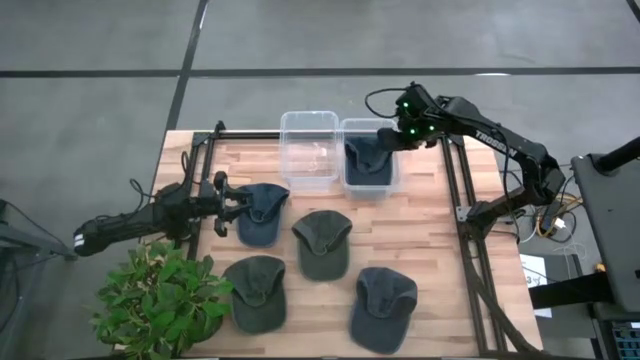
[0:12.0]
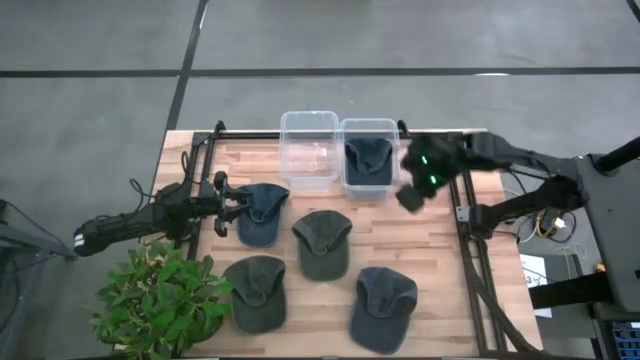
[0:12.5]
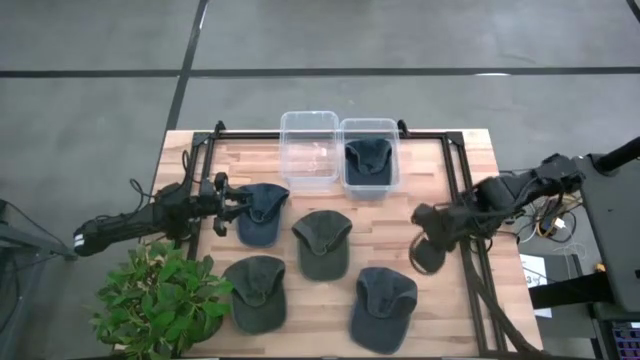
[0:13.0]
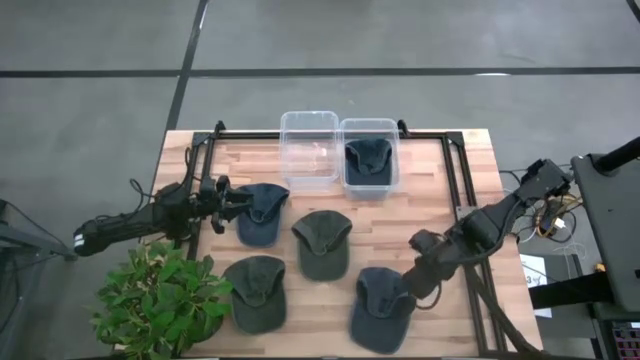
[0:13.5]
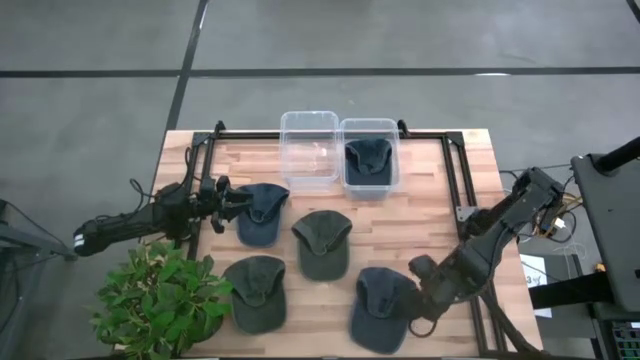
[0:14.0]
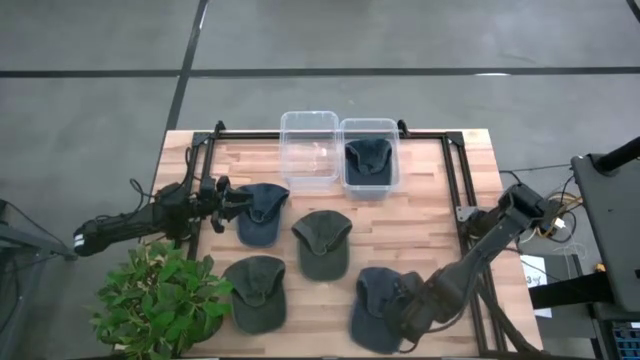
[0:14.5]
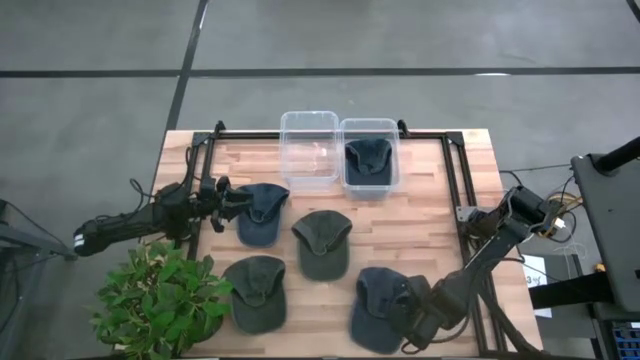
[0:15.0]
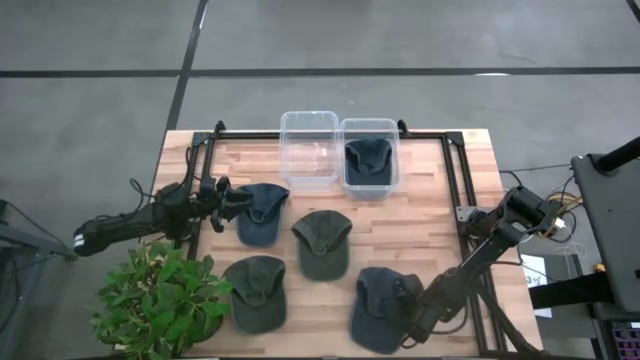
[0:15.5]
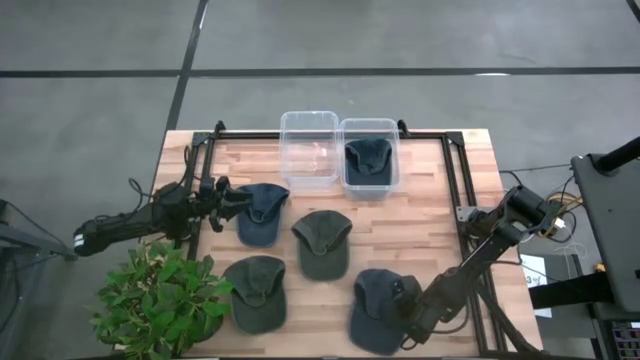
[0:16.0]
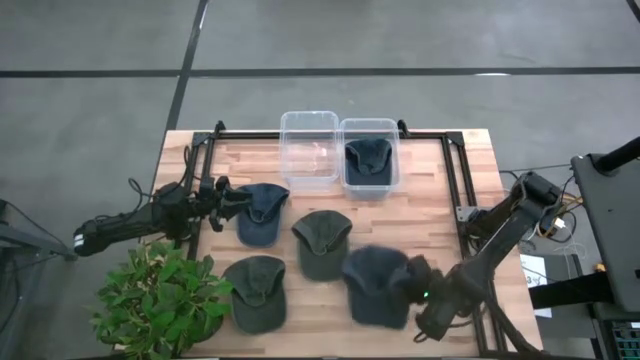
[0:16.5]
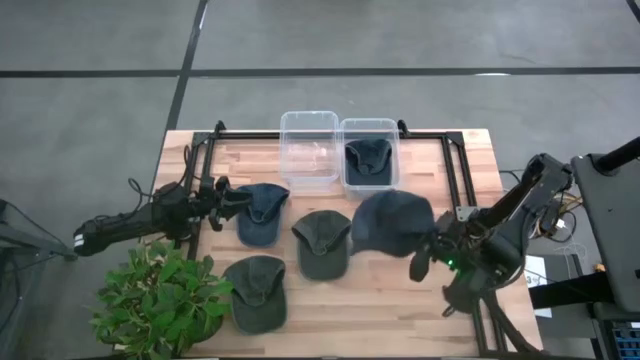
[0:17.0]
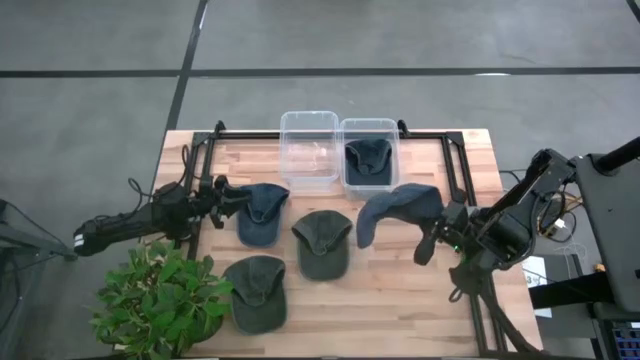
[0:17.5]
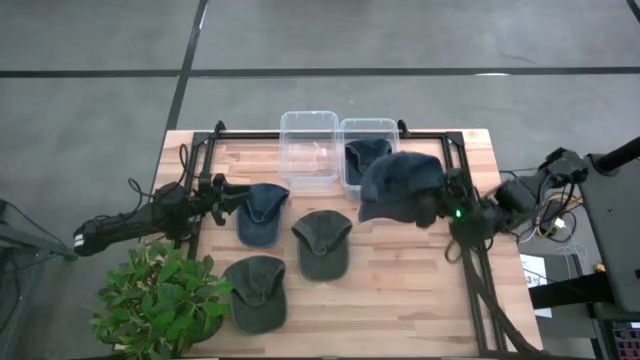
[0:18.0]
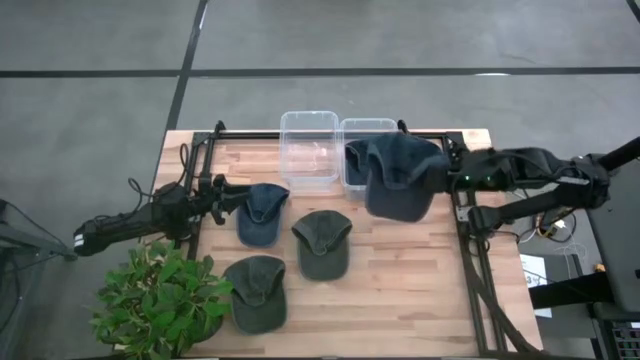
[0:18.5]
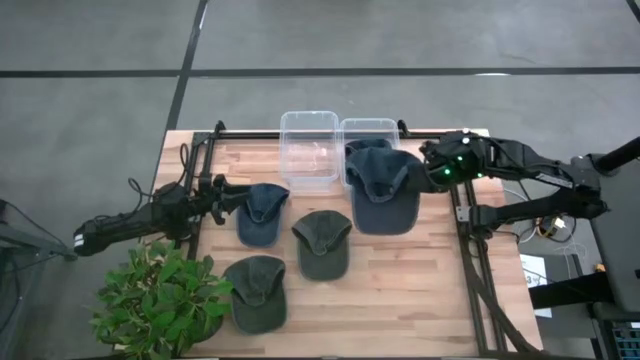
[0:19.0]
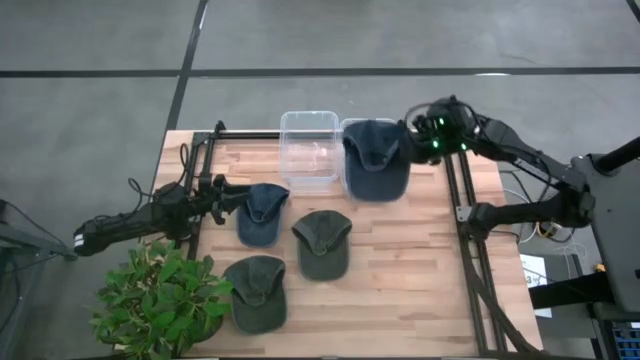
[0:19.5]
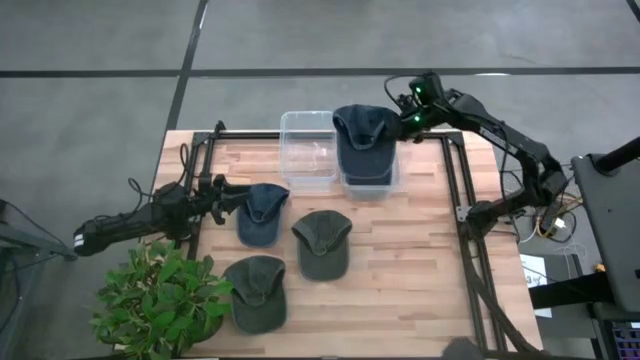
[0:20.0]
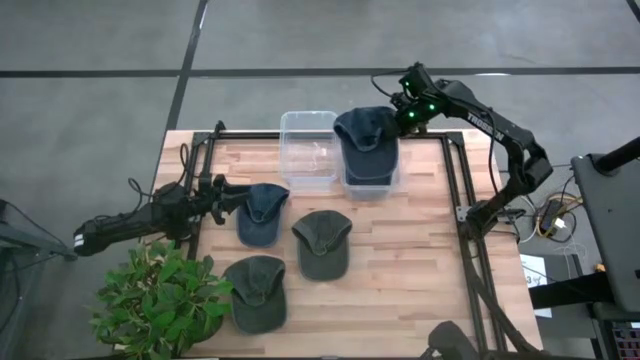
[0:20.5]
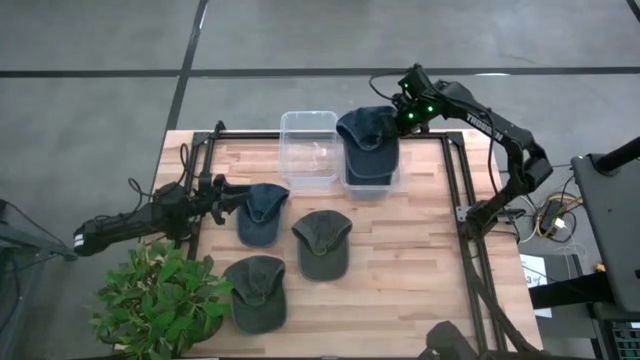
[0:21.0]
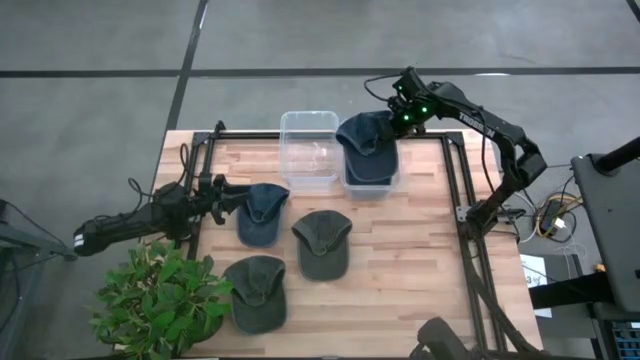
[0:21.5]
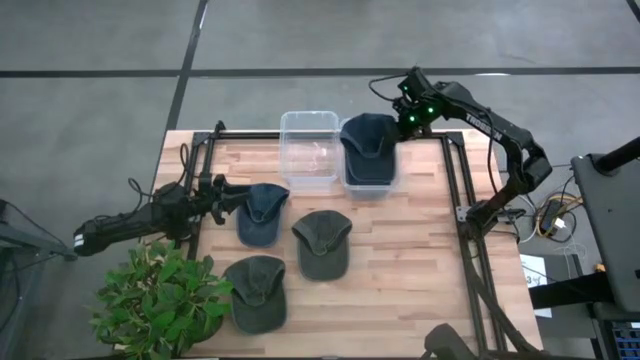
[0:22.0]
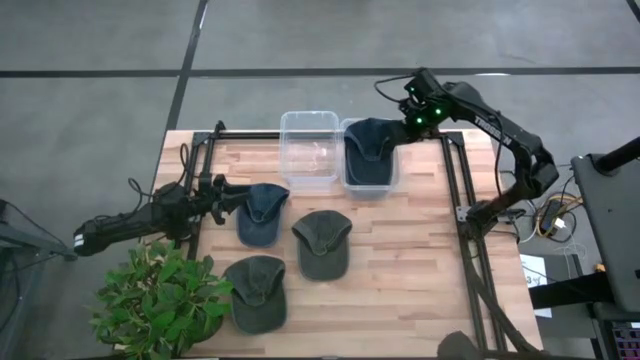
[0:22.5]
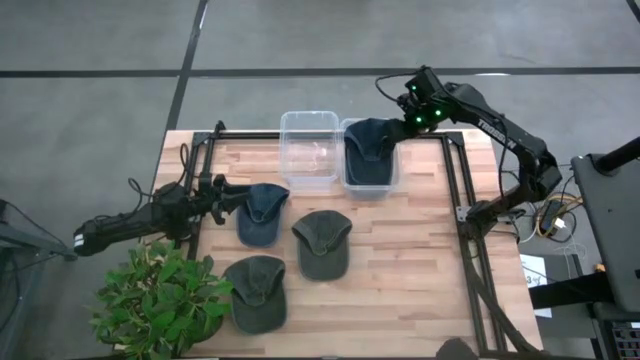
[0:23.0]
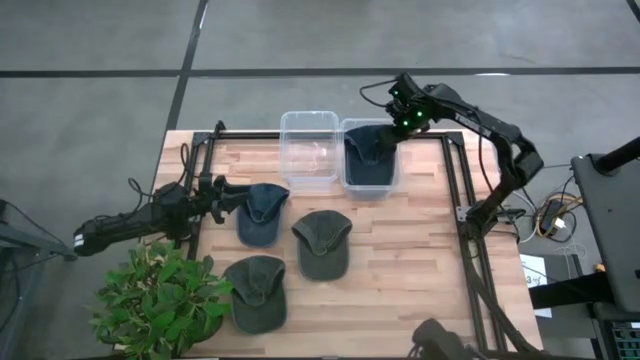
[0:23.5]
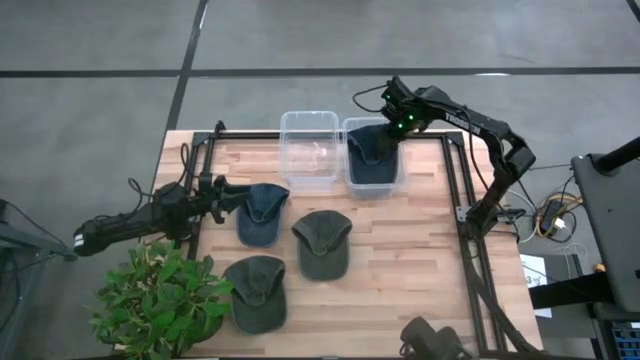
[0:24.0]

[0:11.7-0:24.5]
Task: Pick & Place hat
Put the bottom blue cap into the right transparent bin

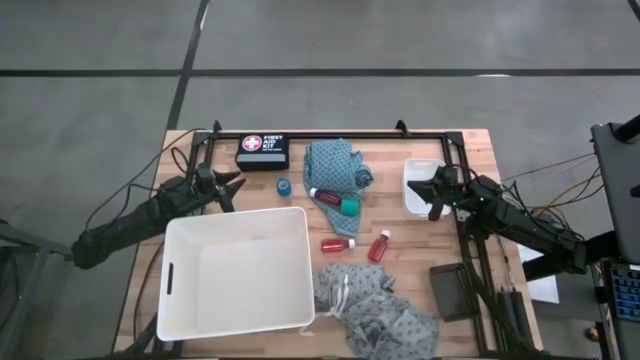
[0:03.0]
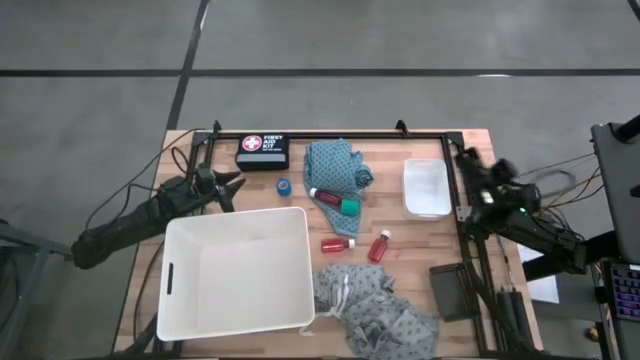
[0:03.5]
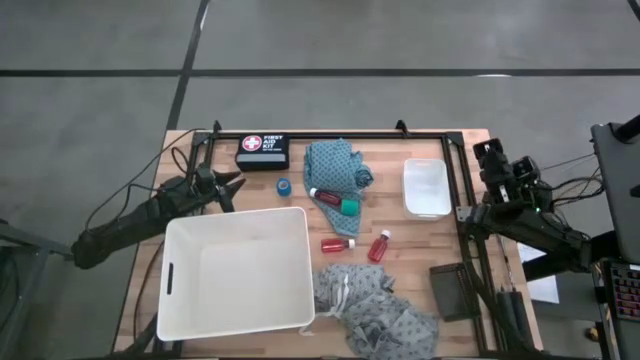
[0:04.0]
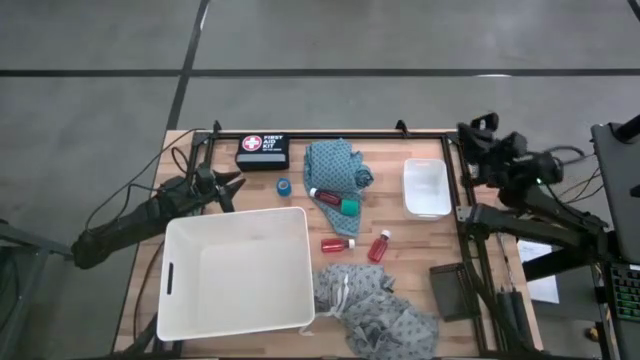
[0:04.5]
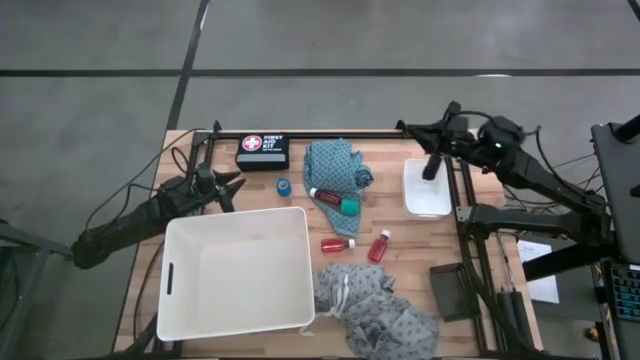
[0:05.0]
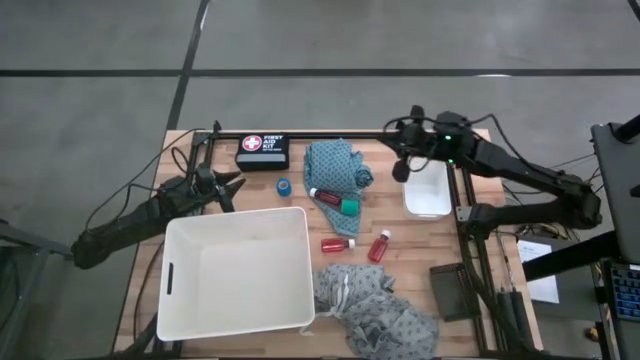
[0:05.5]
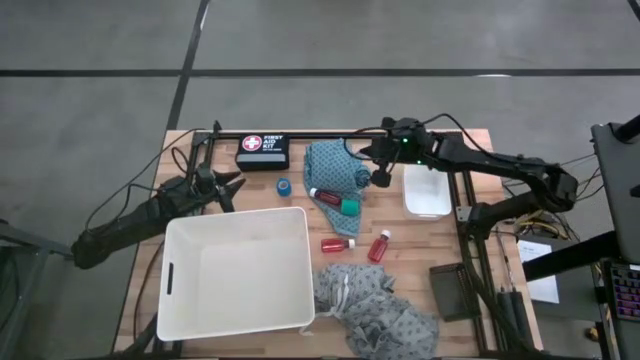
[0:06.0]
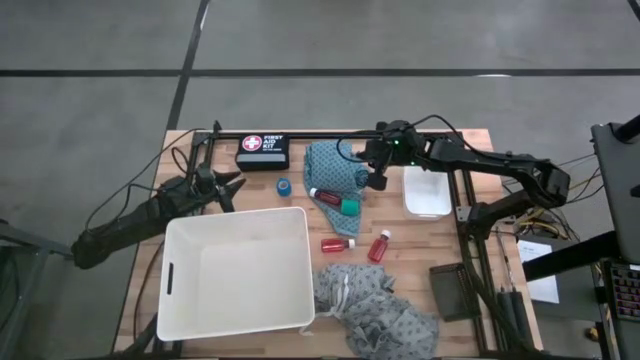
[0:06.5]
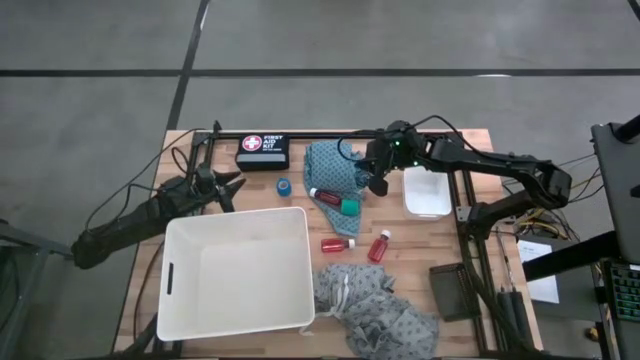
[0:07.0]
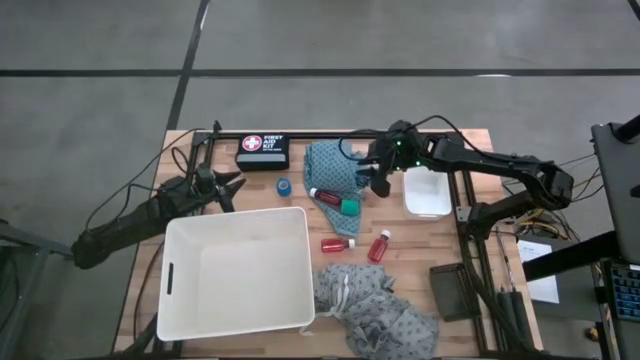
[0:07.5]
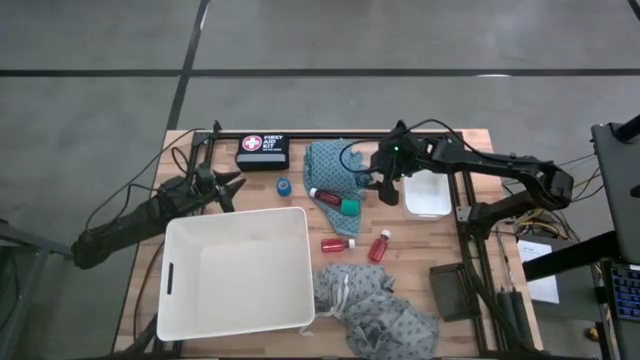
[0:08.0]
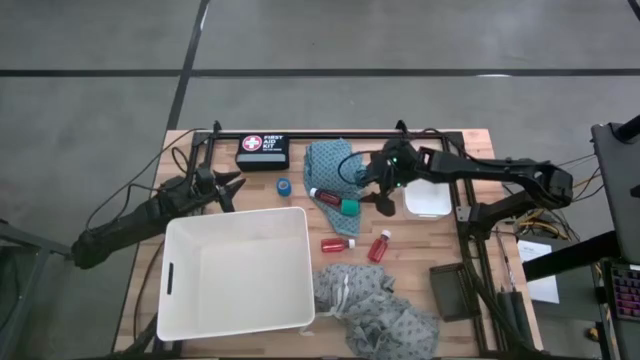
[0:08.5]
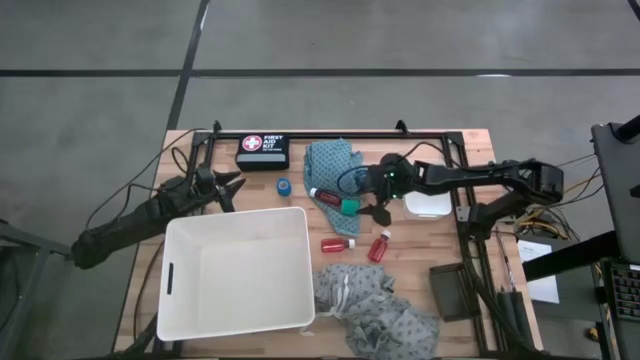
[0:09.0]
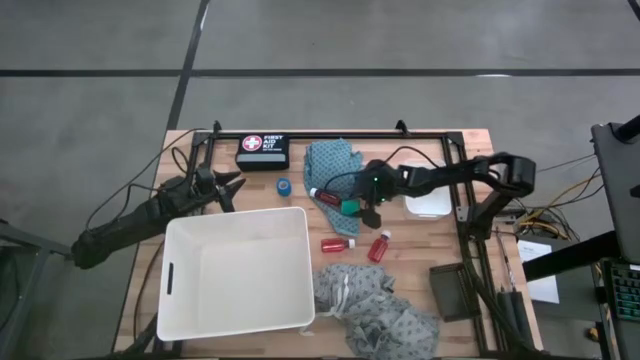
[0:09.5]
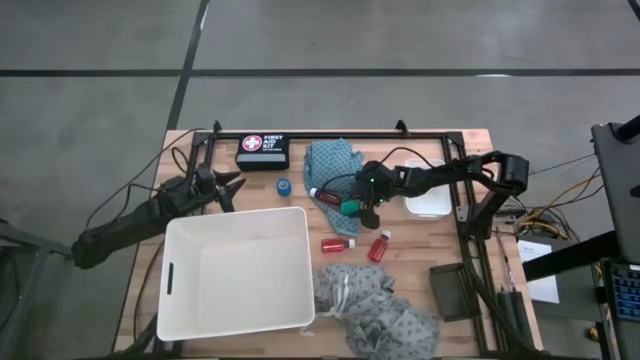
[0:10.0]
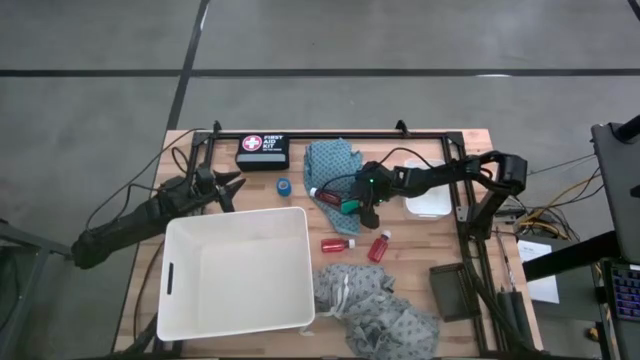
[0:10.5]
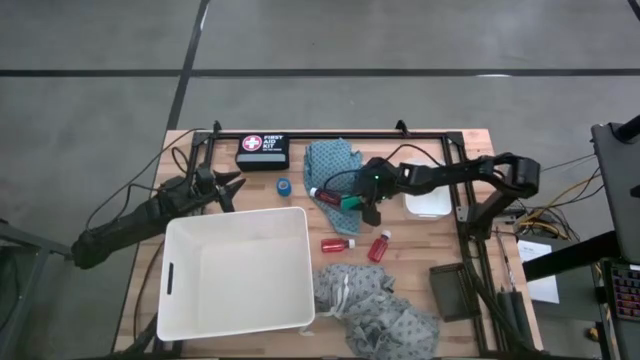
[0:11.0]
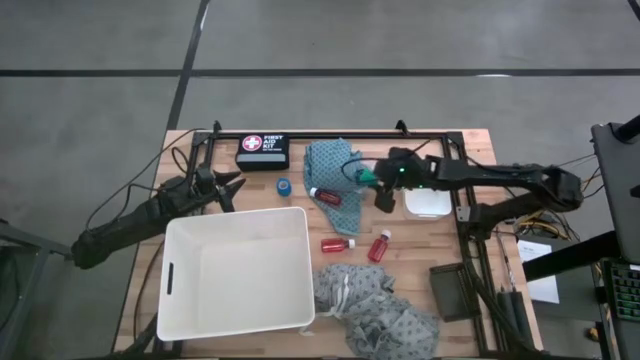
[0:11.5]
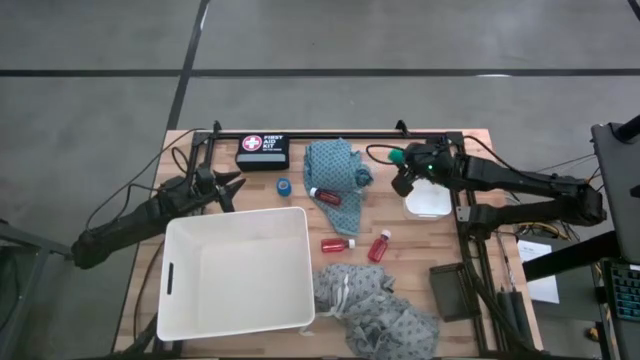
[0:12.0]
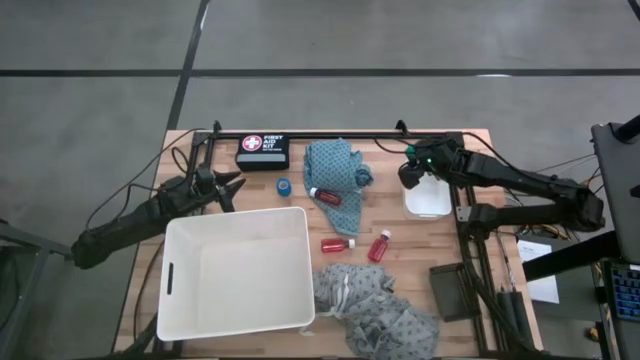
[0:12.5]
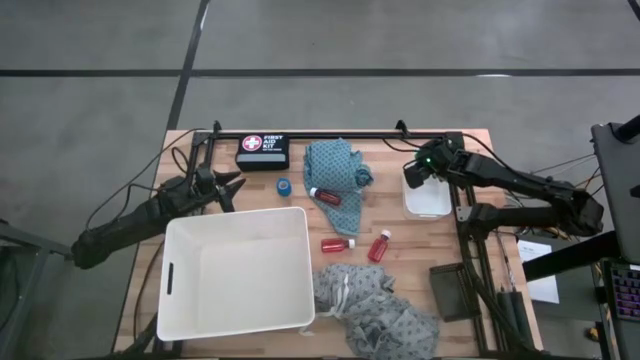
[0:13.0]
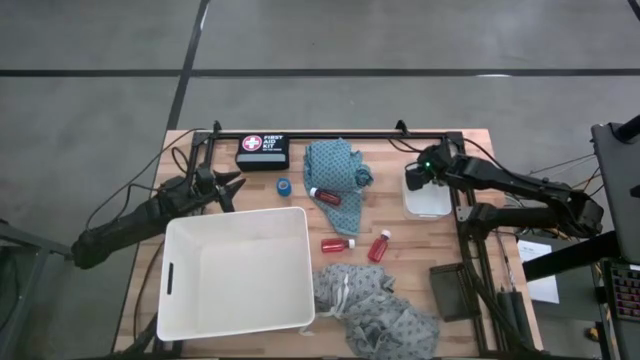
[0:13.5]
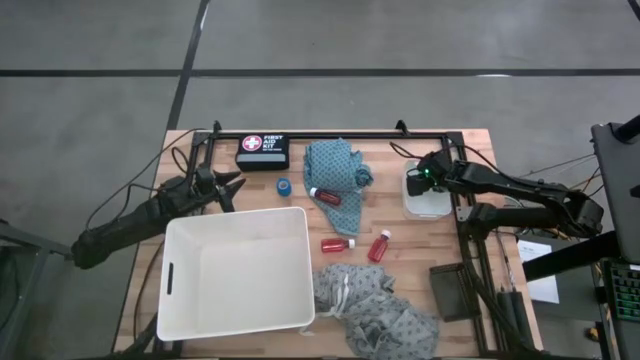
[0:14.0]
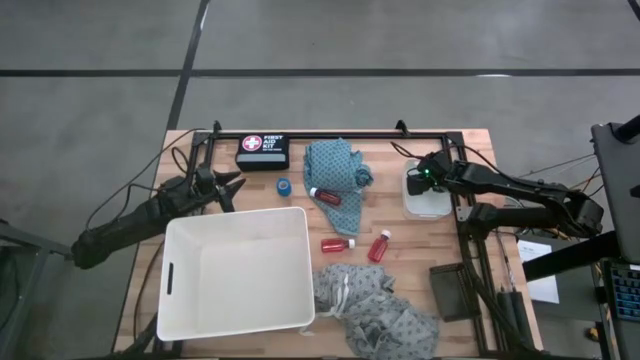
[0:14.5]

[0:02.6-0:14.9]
Task: Pick & Place Medicine items
Put the light green bandage into the small white bin
